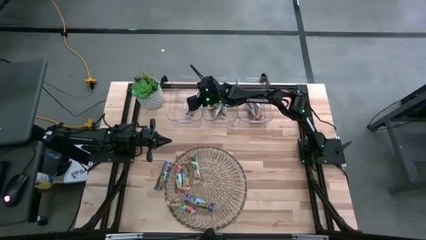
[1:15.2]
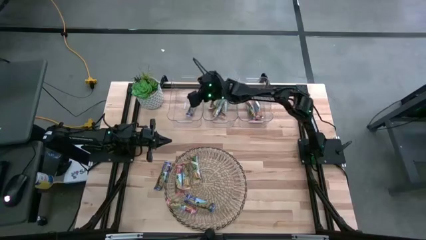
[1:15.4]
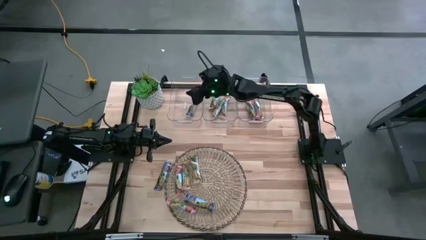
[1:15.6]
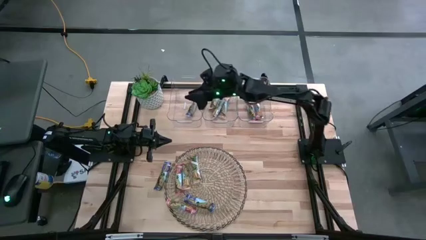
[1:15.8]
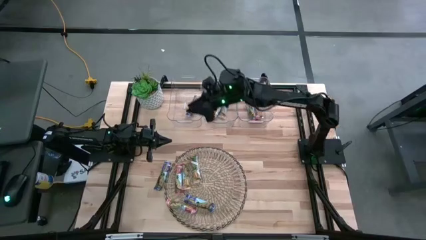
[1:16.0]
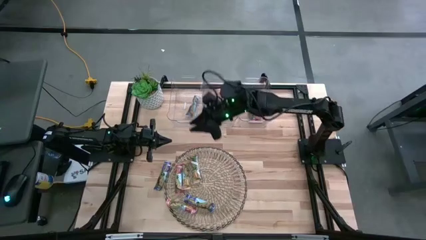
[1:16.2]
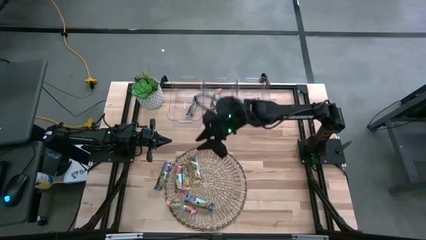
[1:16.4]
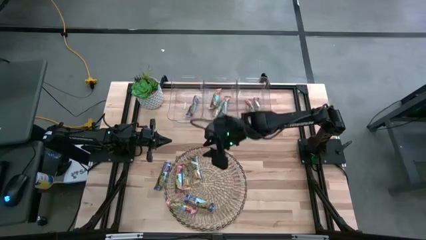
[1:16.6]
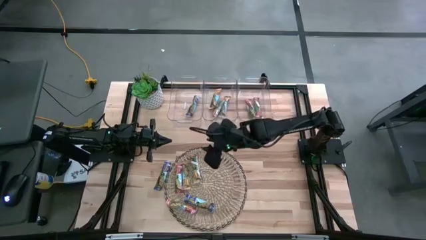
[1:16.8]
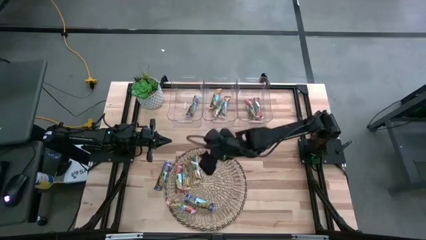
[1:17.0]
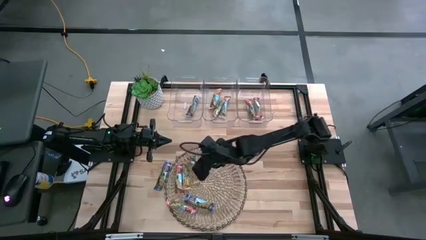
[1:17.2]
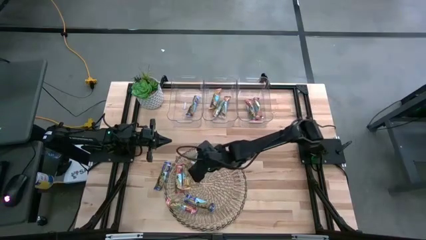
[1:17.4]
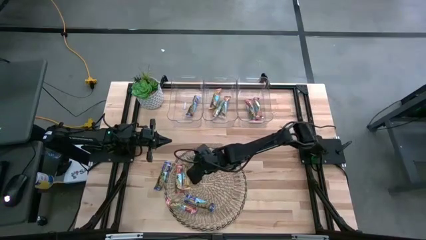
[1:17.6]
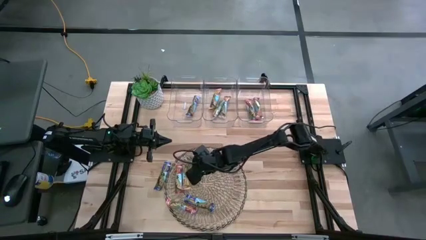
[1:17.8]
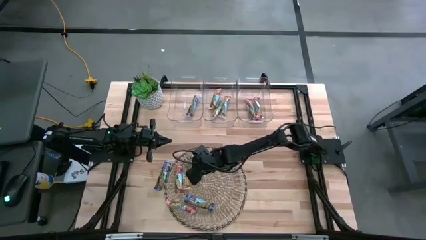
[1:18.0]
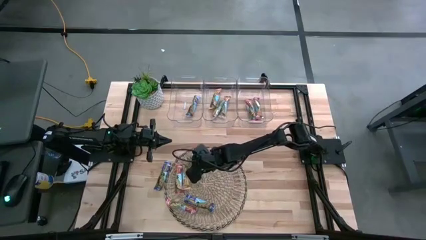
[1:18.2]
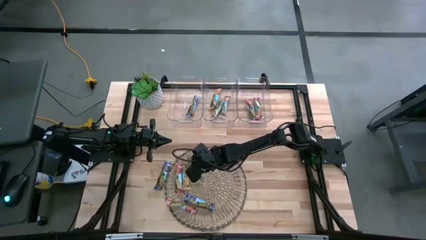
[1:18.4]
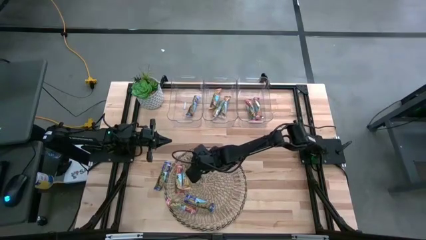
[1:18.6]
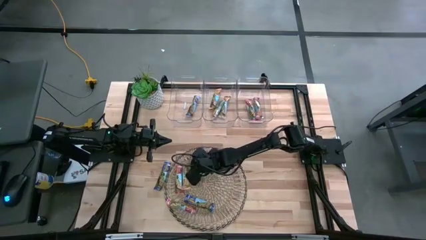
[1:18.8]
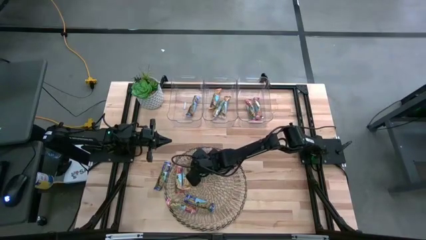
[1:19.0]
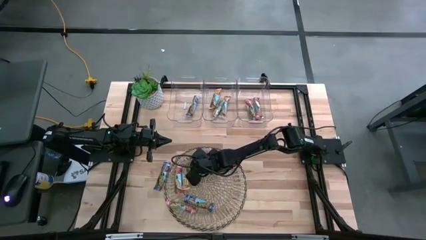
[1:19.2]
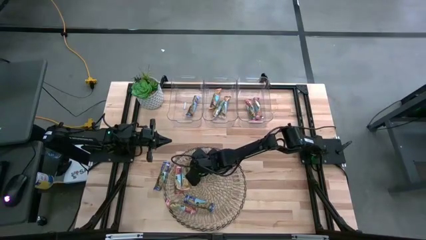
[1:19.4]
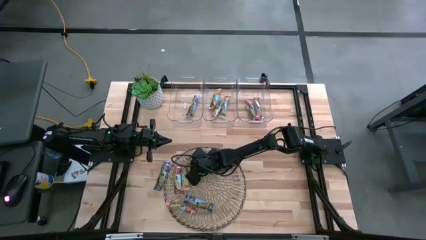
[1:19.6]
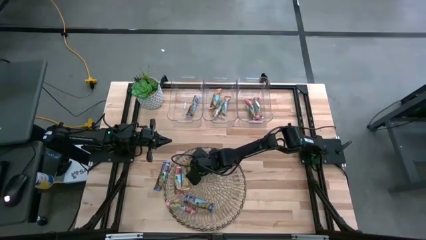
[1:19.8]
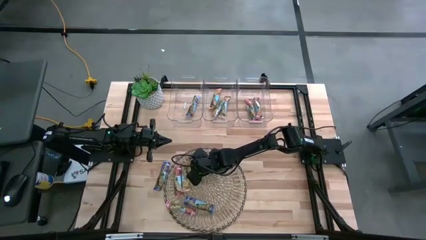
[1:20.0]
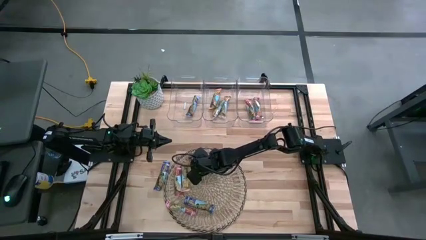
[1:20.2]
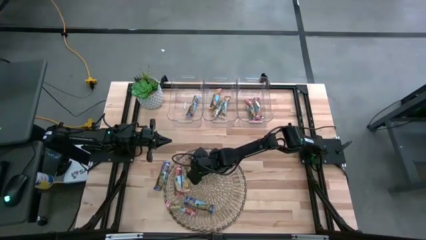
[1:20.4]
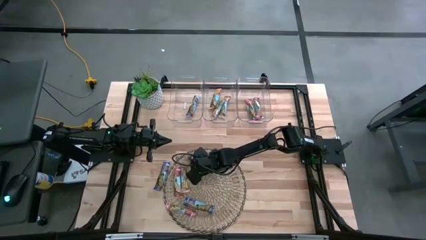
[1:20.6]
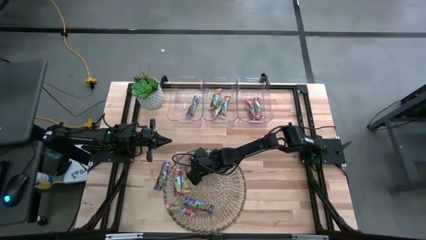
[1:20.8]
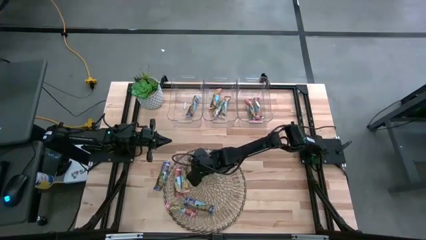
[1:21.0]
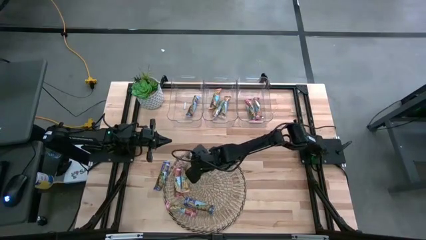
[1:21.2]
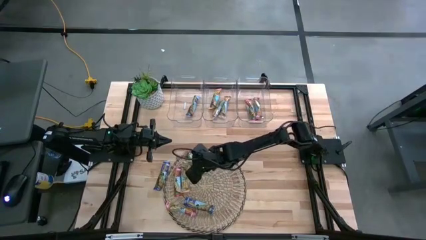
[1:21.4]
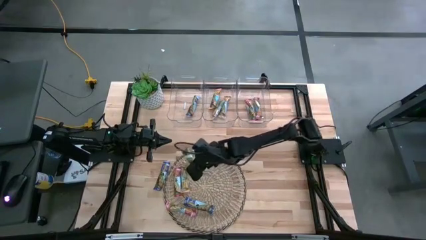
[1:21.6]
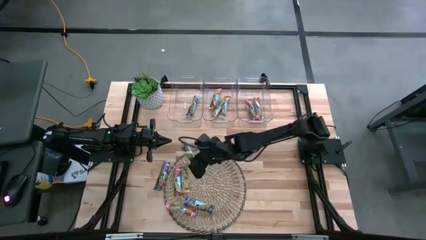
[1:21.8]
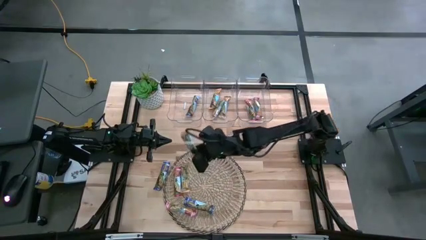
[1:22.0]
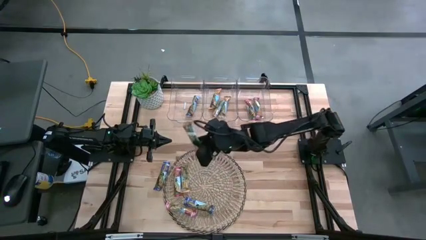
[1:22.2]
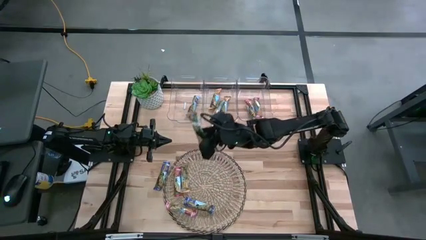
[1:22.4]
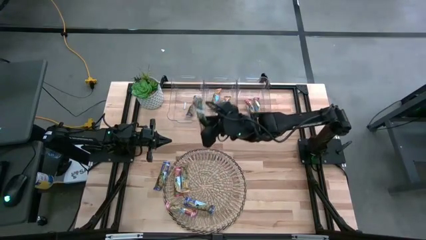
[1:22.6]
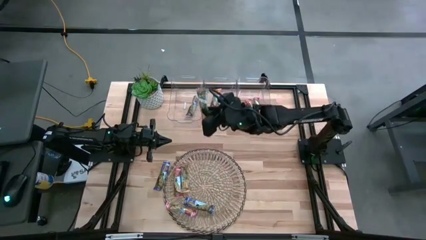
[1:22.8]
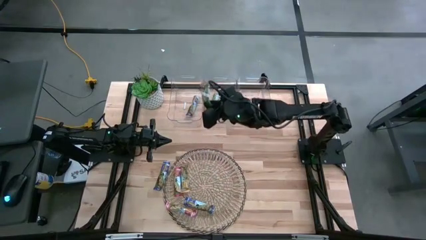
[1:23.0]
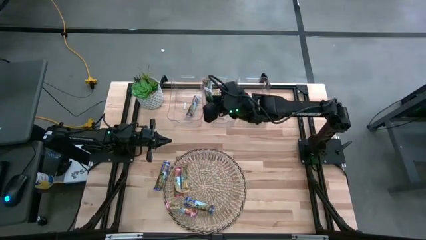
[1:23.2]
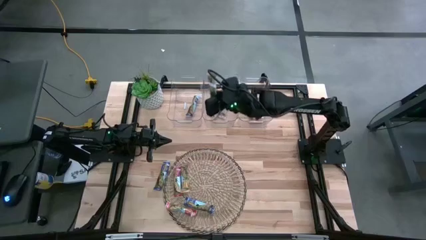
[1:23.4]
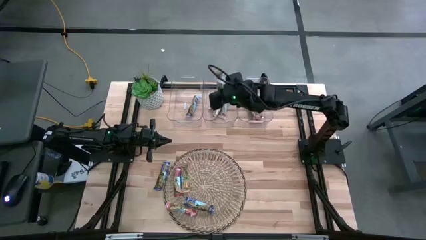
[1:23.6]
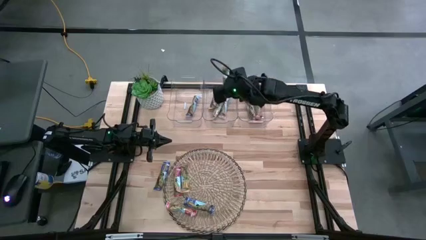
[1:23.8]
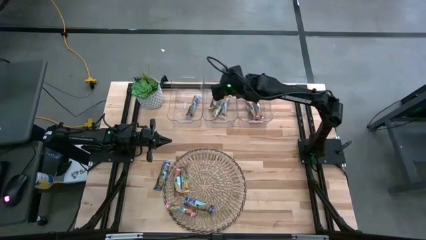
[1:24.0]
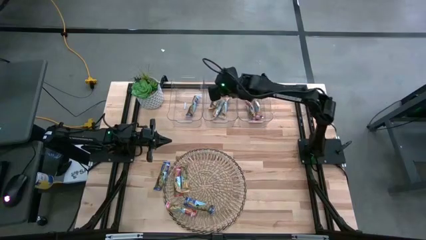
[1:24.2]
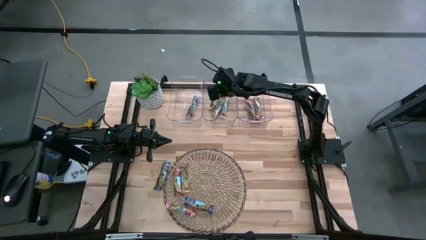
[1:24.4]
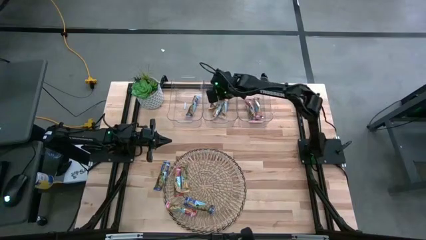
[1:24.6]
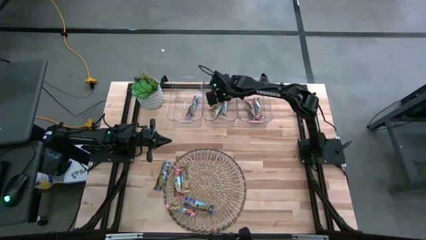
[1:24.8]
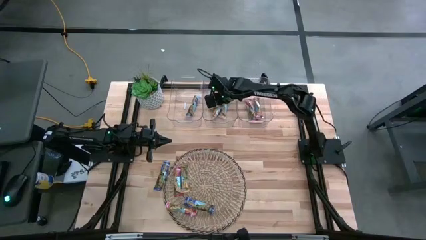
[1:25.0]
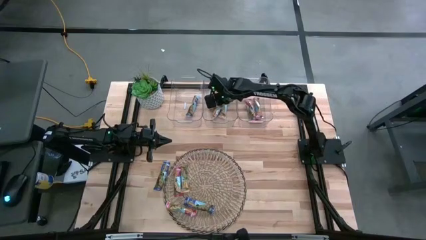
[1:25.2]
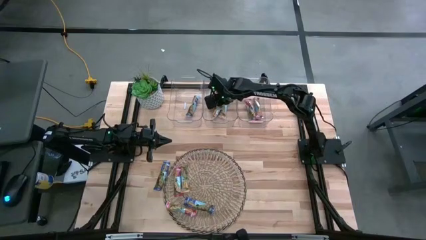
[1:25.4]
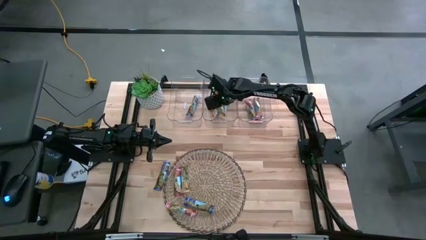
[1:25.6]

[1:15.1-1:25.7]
Task: Pick and place Granola Bars by type
Put the yellow granola bar into the middle transparent bin

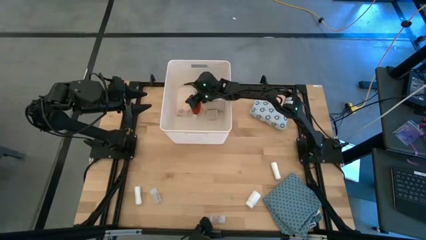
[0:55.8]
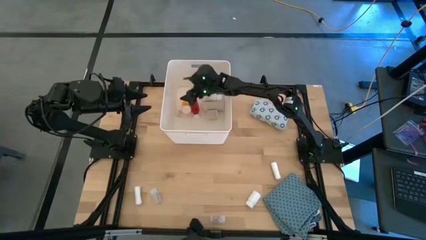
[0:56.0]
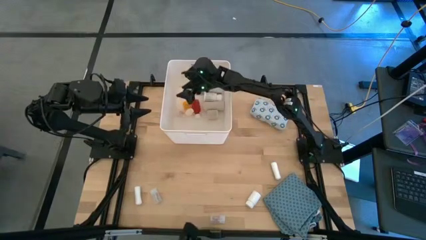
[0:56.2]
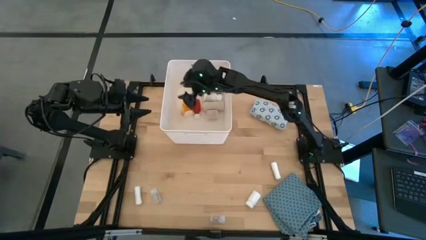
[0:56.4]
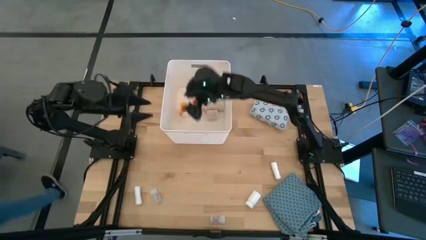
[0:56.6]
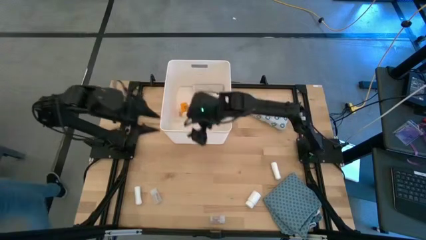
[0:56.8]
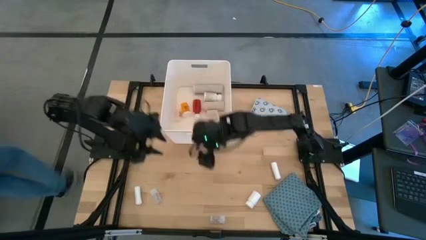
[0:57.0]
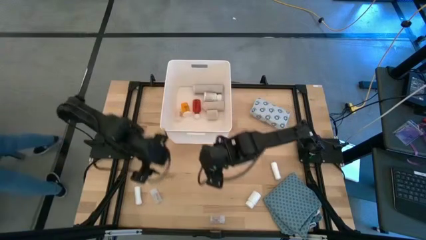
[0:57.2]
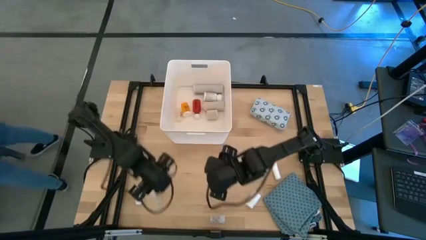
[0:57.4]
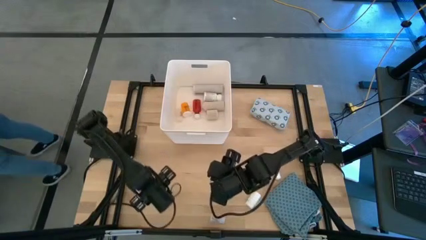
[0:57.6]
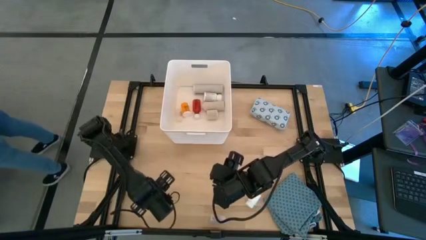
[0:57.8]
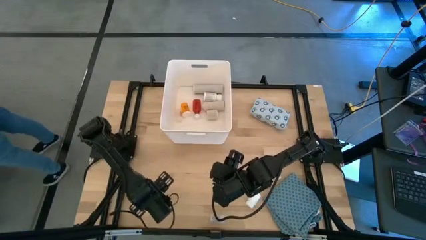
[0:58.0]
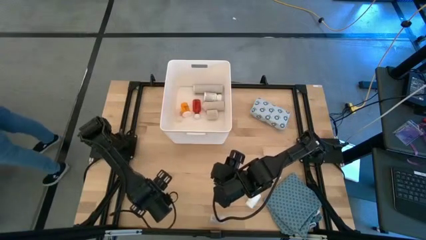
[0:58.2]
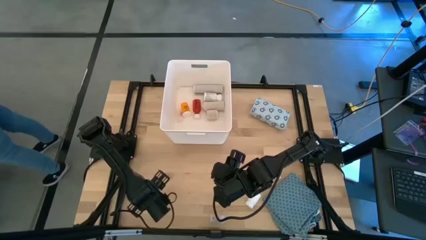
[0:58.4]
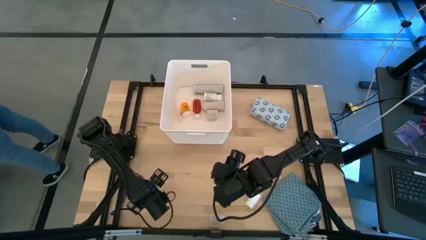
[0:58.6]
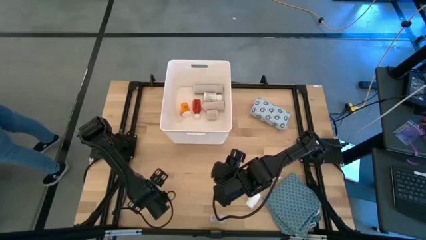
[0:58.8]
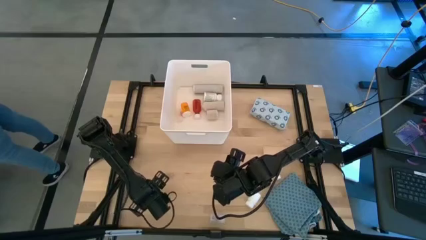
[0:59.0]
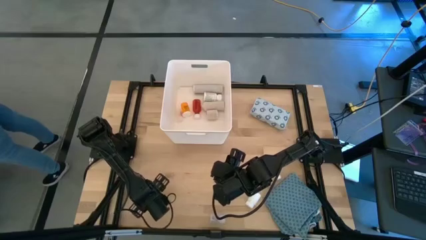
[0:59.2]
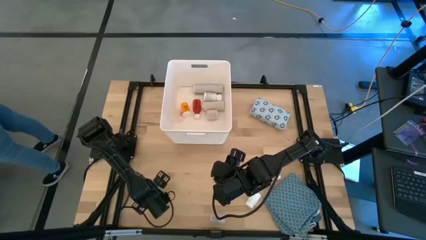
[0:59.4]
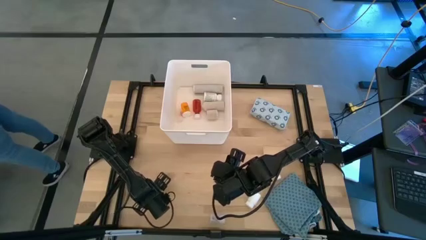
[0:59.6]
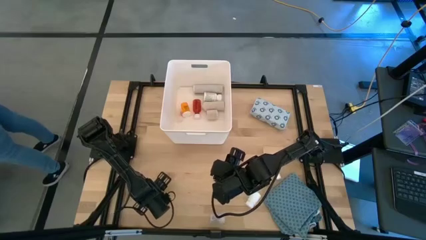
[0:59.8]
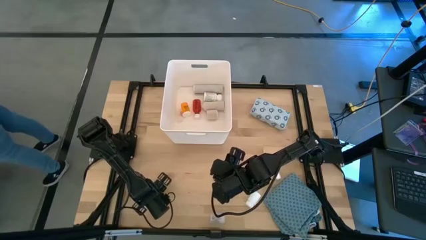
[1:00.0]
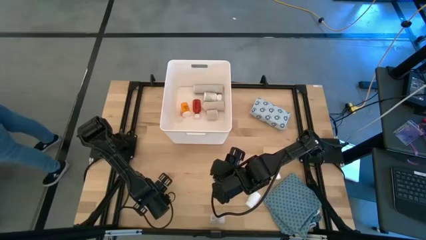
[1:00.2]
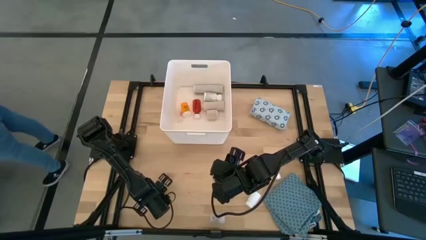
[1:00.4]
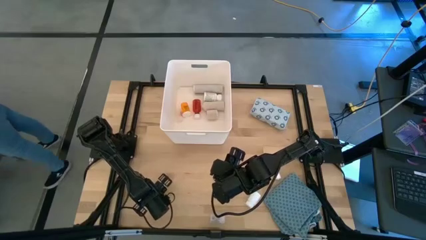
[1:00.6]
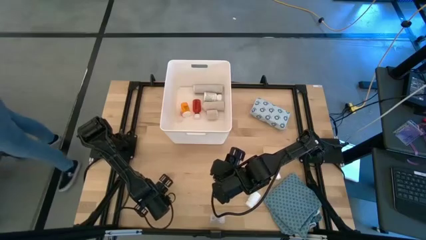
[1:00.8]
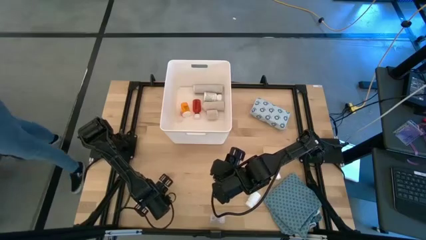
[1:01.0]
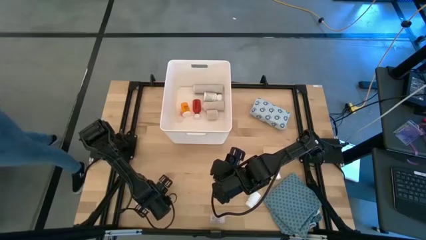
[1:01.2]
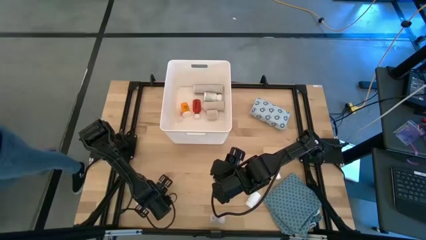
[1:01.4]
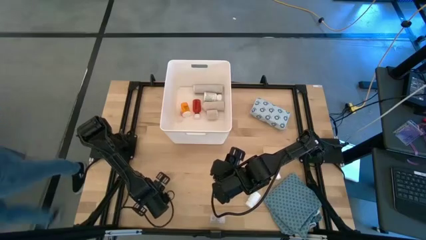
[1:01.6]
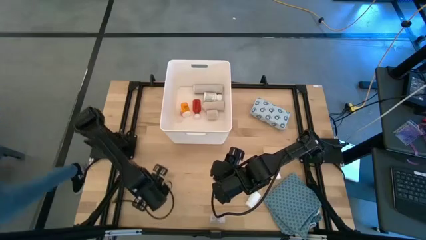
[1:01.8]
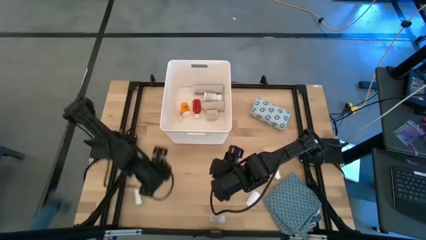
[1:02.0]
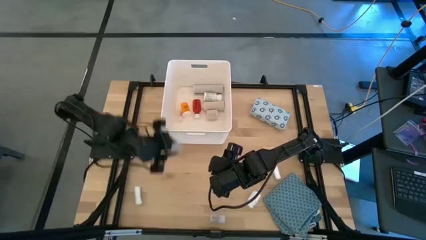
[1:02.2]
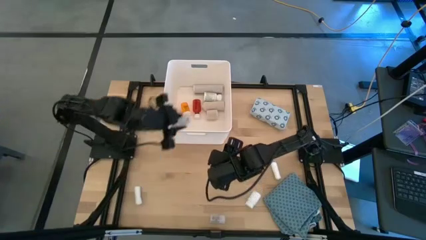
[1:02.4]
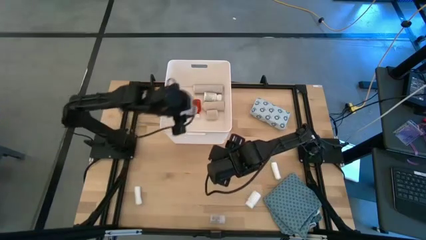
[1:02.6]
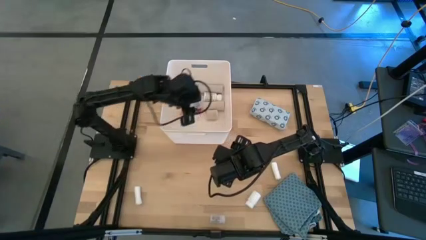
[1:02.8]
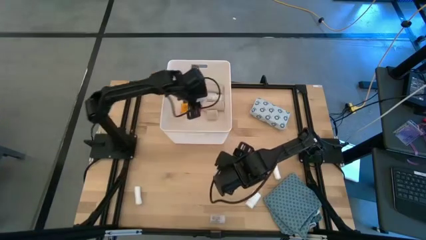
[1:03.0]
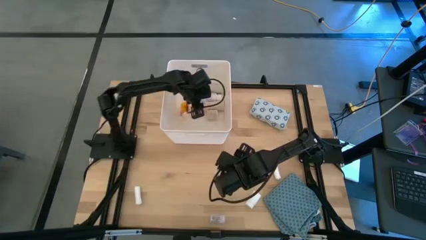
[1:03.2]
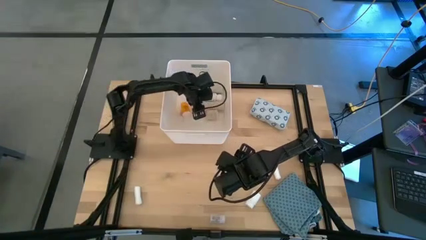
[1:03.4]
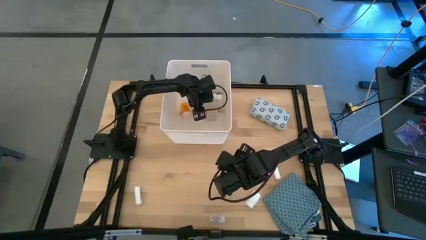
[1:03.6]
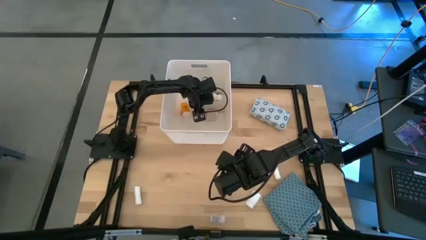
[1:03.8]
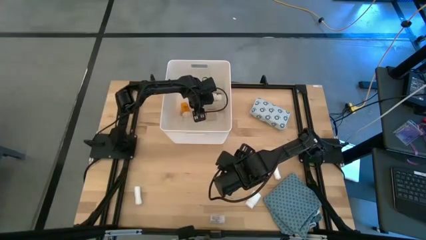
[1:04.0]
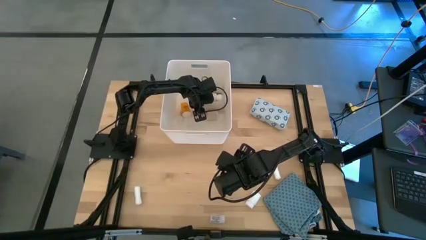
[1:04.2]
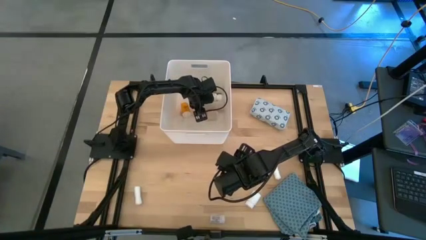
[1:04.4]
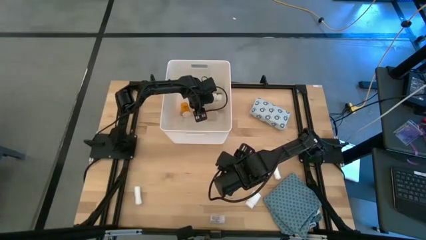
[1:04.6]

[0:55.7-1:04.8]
Task: Pick & place medical supplies in basket/bin
Put the top transparent pill bottle into the white bin
